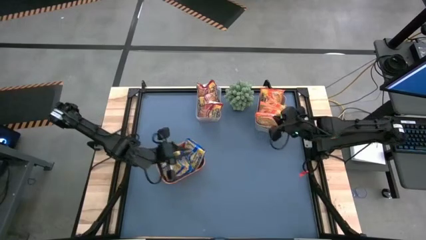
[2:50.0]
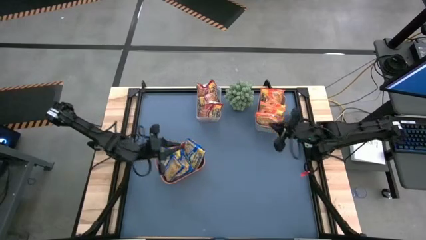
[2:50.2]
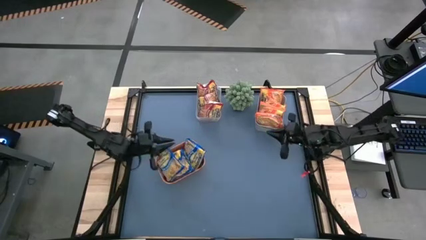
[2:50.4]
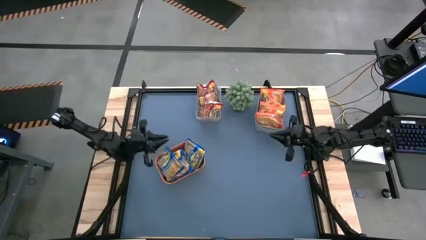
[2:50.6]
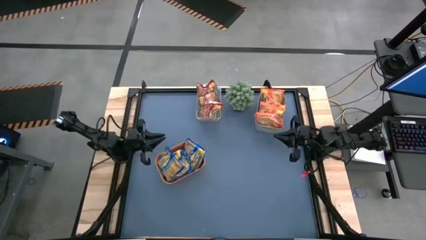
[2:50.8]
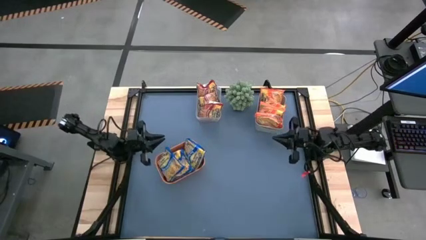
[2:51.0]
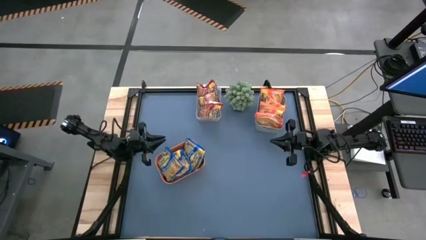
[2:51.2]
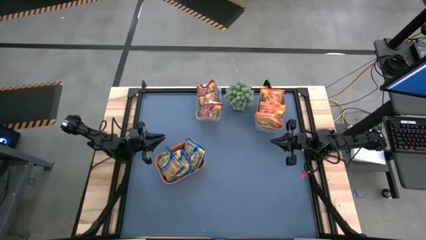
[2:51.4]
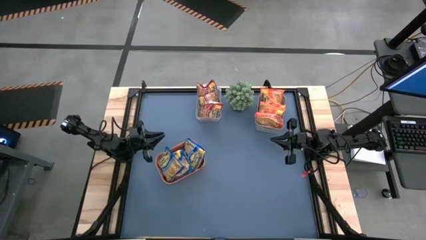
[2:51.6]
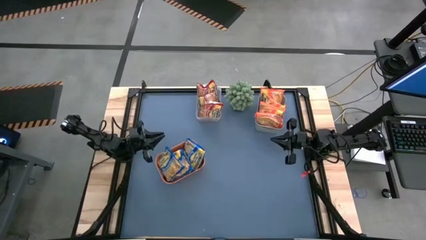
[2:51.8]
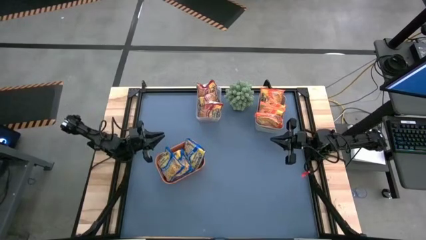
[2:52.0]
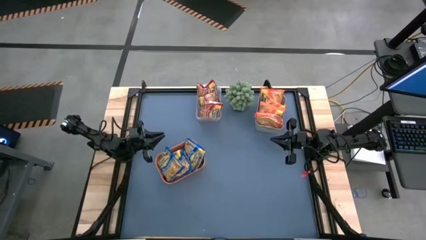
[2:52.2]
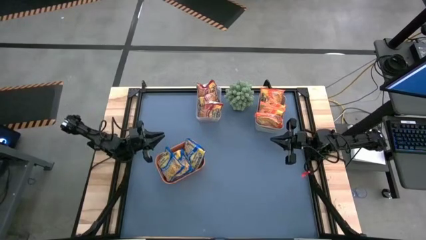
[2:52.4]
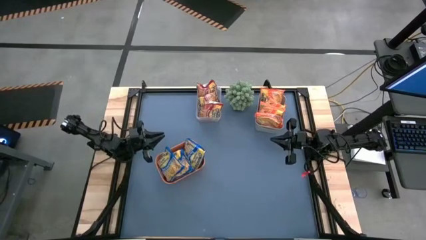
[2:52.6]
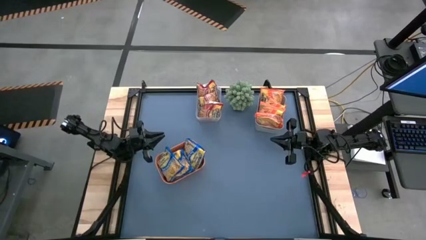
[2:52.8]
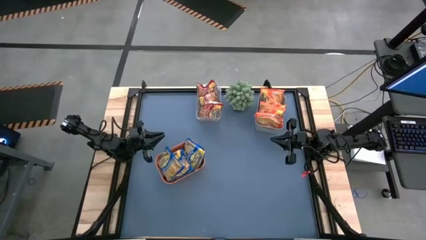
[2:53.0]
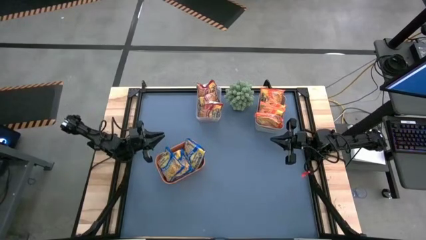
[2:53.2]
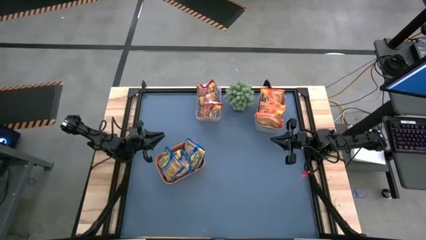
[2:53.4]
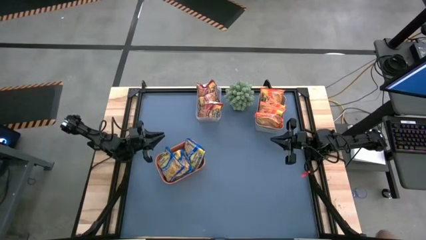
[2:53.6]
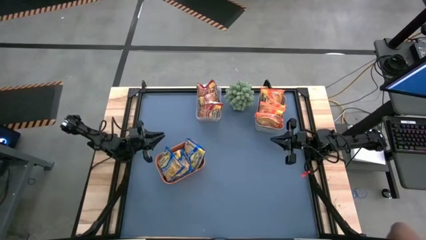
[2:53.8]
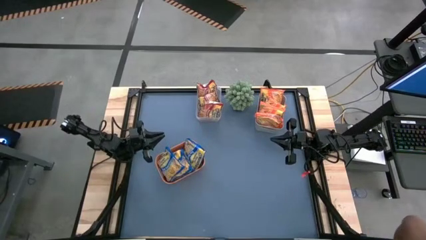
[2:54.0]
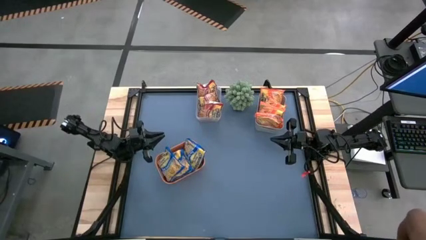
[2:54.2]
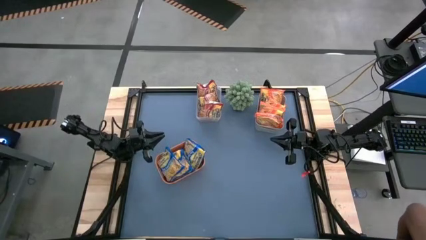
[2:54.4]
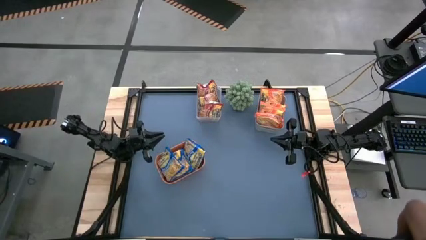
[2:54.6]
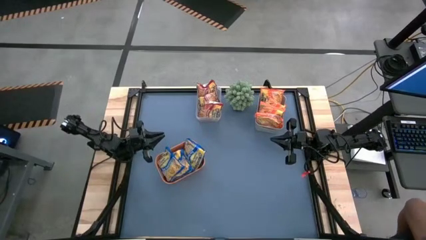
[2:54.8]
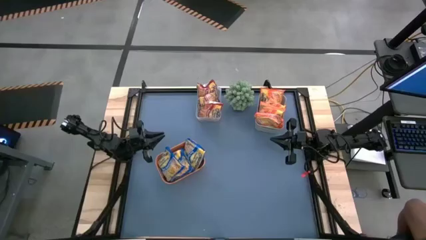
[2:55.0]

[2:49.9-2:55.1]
Task: Sort Maruchan noodles
Return to Home Position

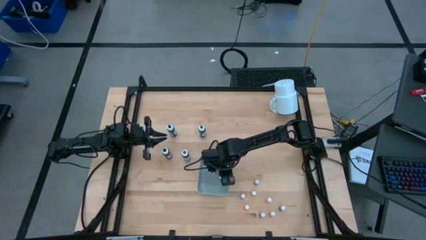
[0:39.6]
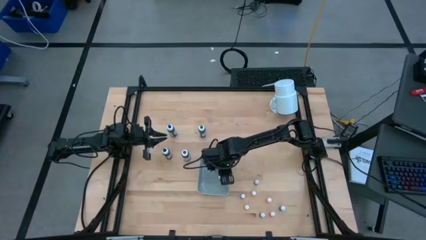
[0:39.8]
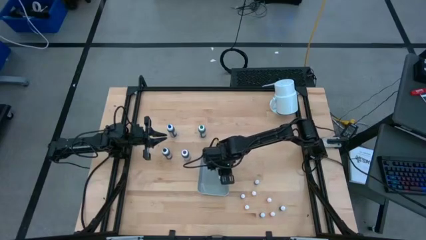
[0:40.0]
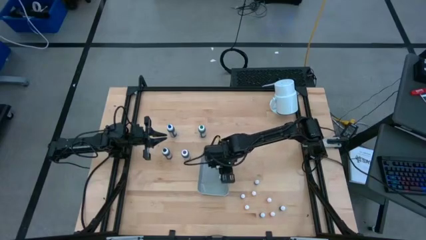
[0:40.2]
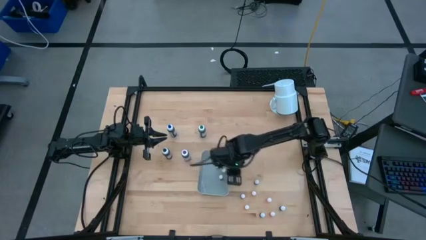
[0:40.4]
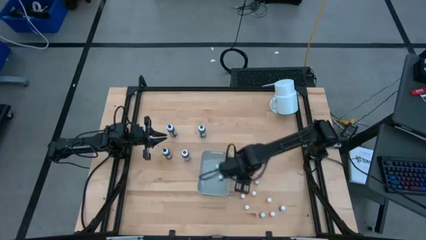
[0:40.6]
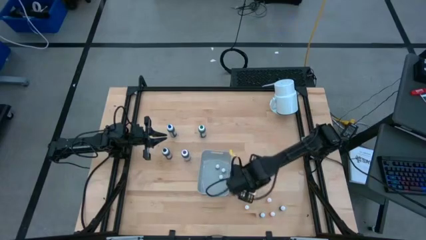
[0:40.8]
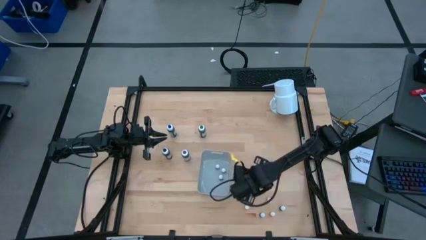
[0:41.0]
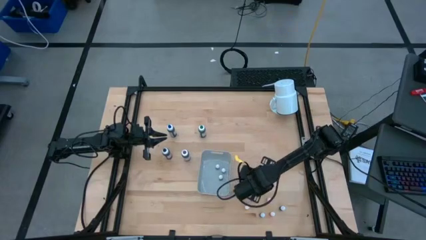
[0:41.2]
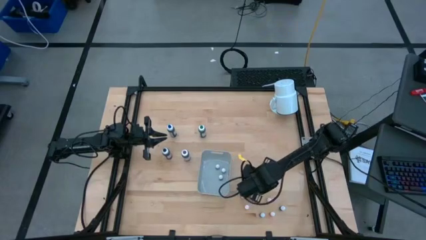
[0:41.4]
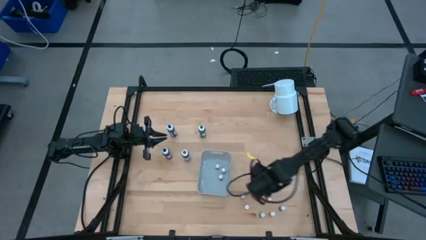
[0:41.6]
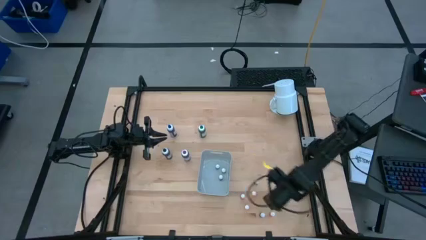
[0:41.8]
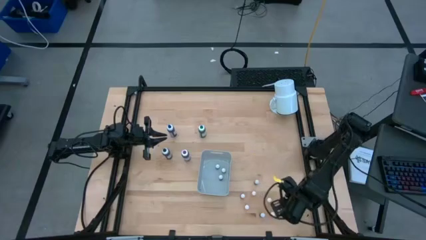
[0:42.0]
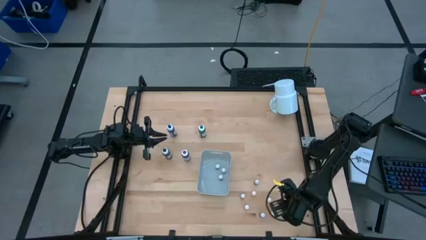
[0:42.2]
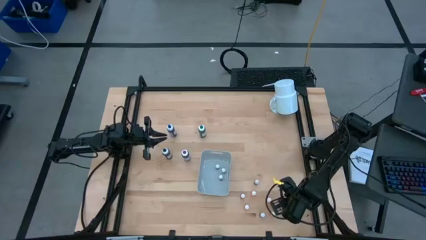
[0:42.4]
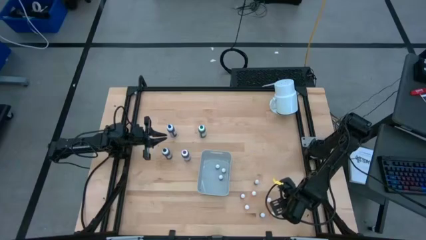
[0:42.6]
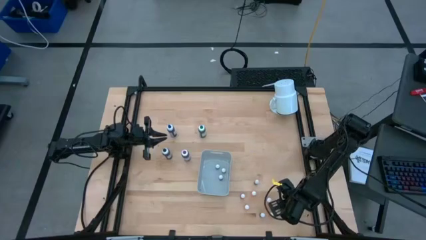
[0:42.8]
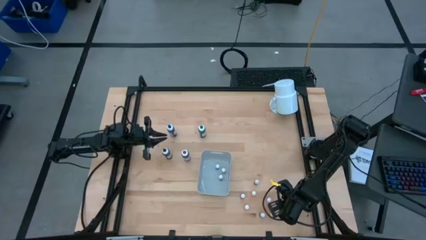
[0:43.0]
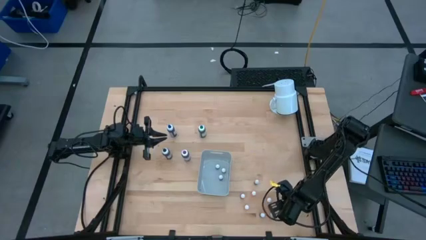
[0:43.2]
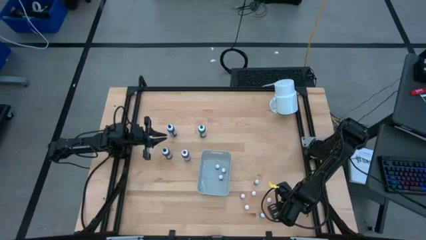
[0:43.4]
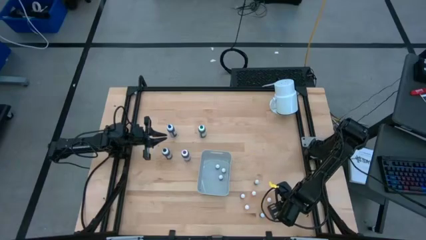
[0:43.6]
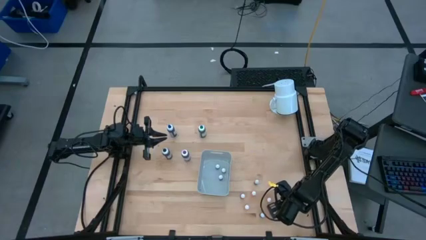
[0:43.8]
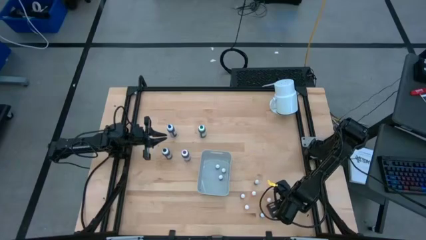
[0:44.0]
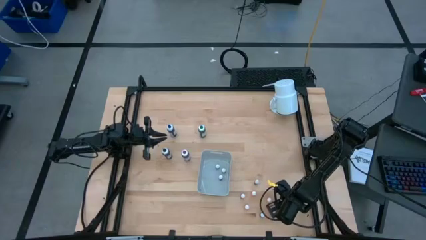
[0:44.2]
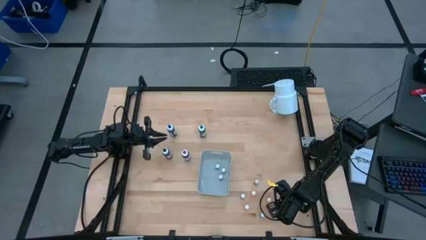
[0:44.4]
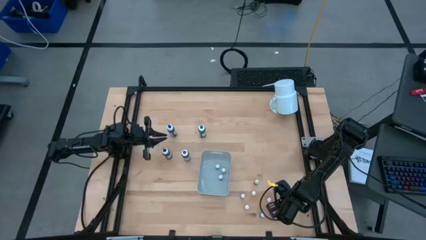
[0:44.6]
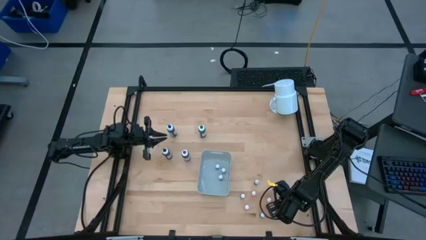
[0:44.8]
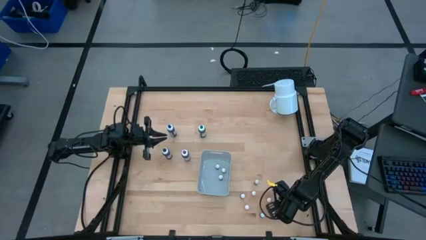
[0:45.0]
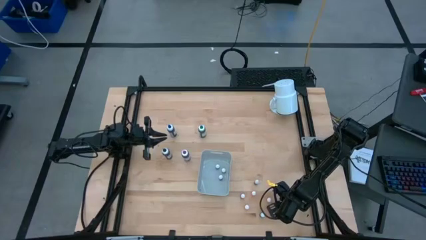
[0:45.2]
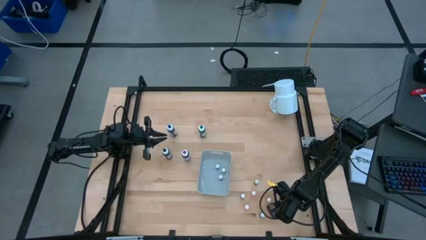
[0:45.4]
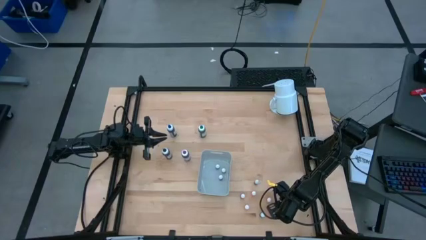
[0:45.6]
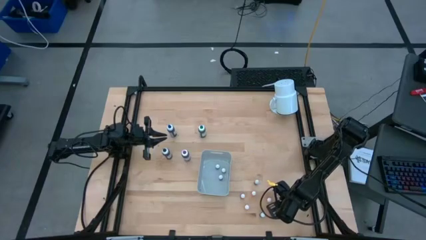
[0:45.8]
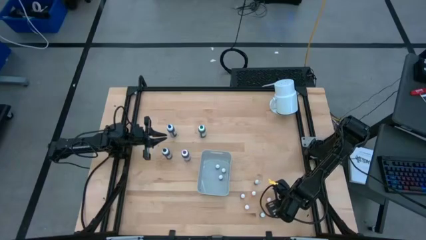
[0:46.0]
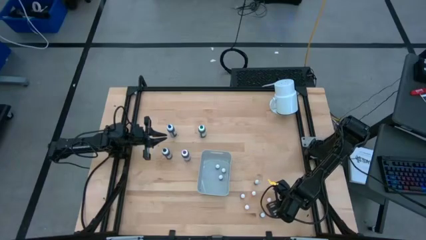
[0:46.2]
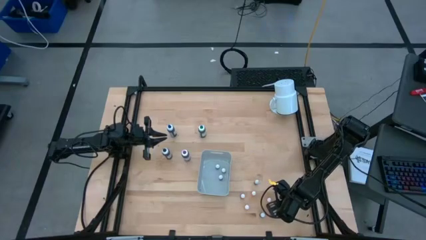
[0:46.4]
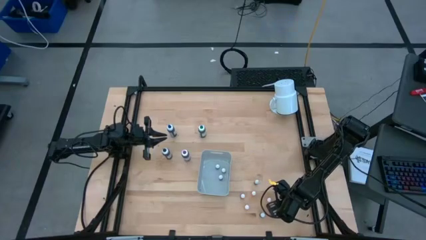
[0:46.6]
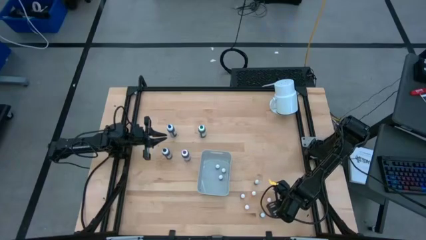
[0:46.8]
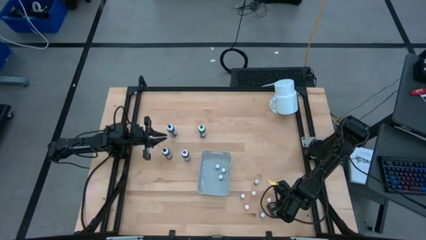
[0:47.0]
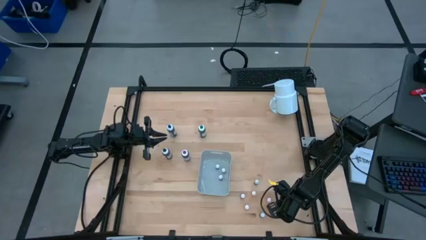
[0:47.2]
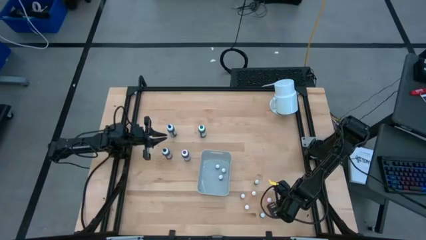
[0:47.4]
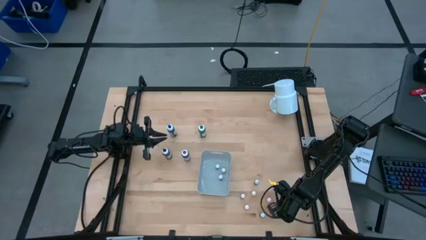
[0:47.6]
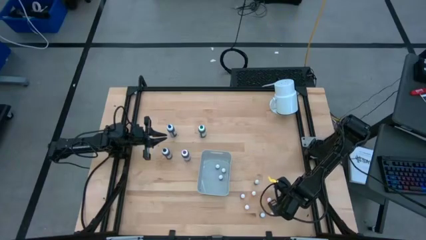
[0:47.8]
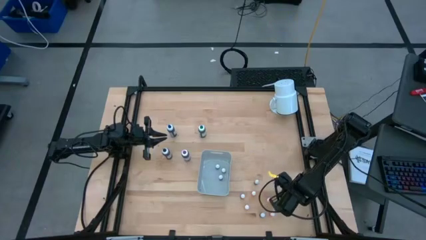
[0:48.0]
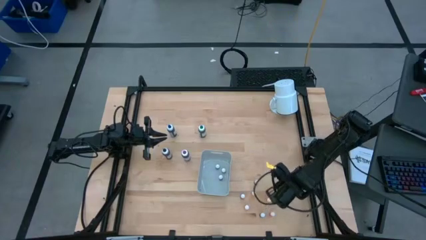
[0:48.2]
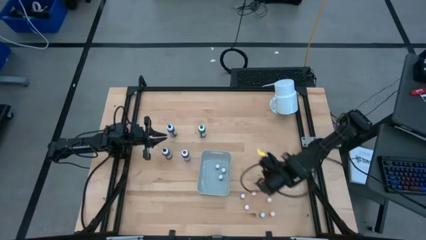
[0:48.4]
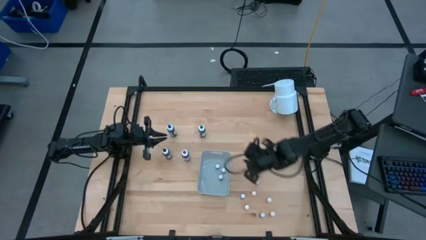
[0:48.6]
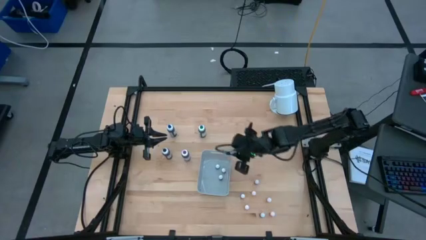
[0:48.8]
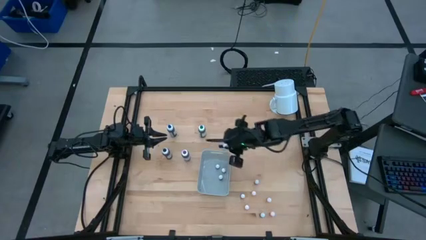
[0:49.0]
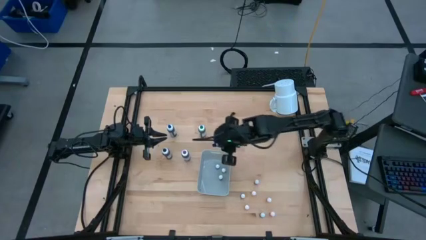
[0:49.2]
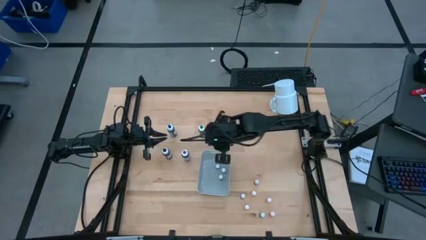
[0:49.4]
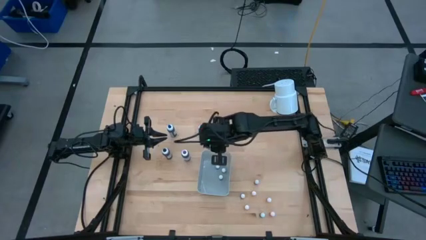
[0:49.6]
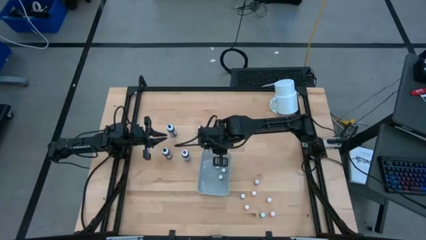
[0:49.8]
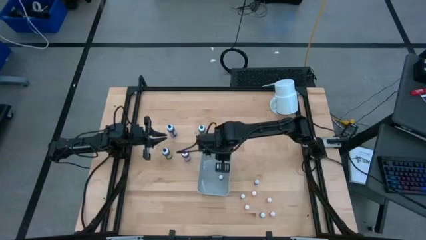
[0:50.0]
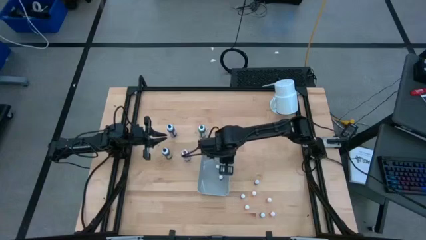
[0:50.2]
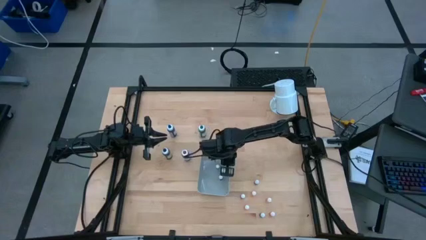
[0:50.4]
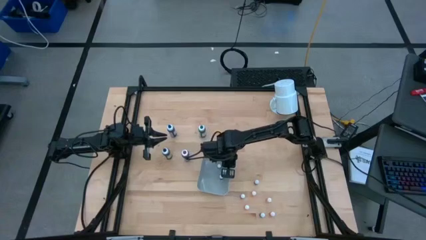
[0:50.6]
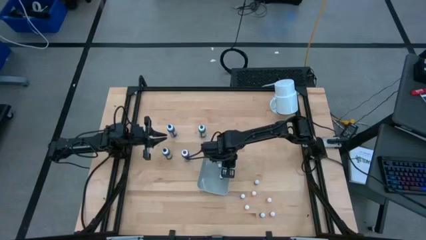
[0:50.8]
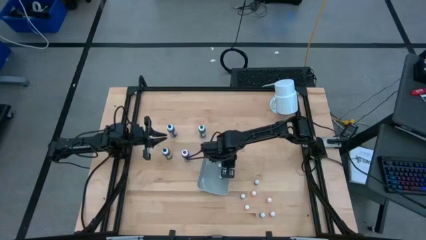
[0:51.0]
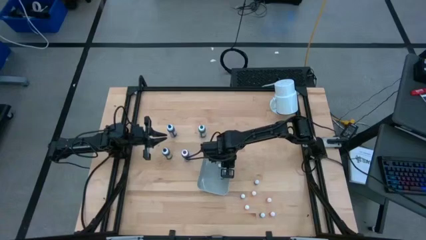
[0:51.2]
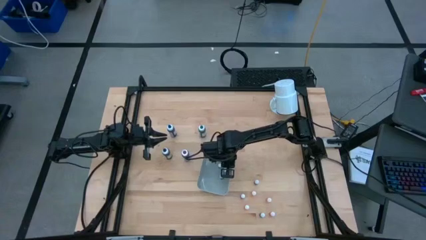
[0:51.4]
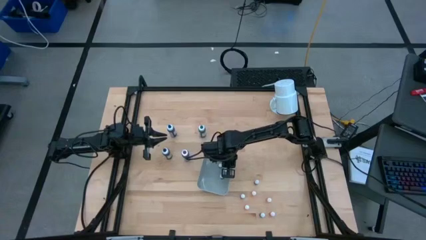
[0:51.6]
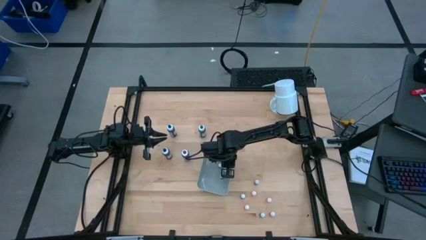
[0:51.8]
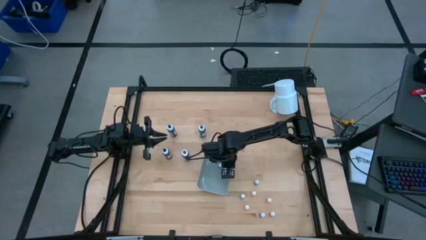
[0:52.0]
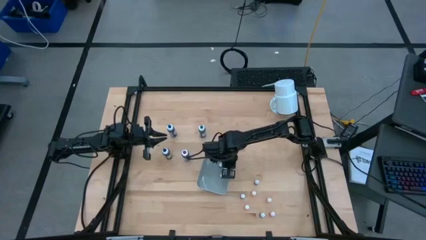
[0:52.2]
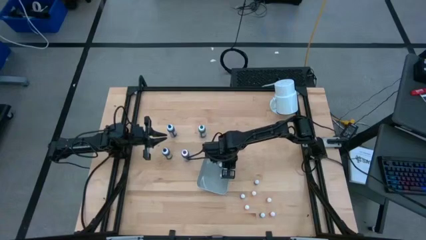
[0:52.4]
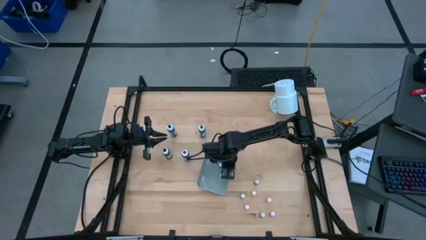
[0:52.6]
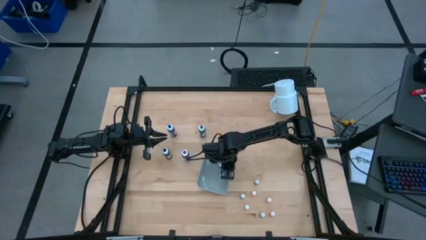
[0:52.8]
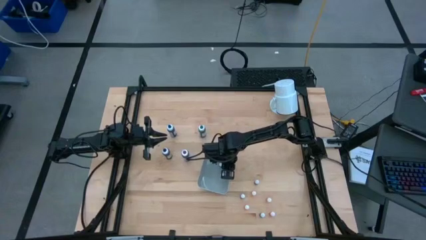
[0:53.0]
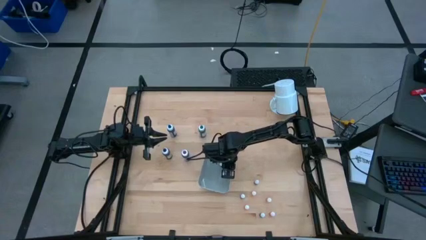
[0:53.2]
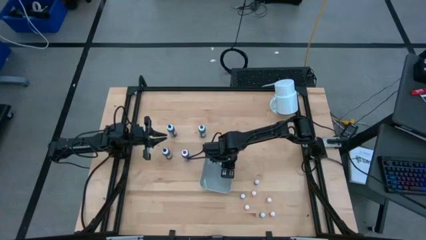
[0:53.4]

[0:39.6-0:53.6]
Task: Pick & Place food coloring
Put the small black food coloring bottle into the white bin
